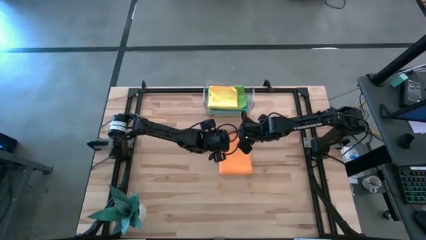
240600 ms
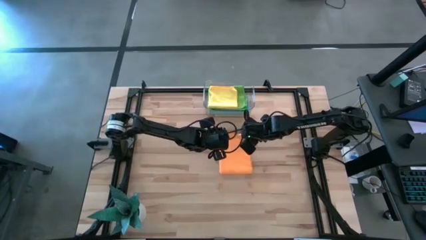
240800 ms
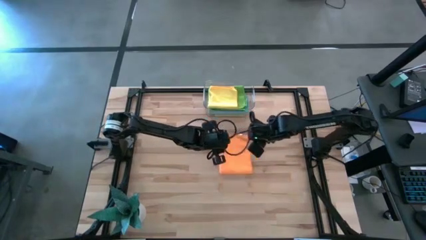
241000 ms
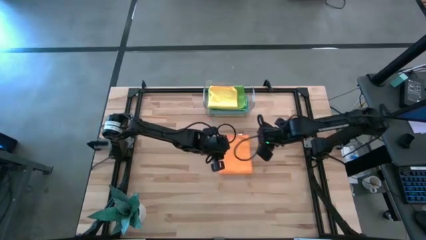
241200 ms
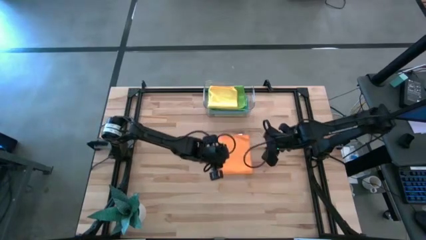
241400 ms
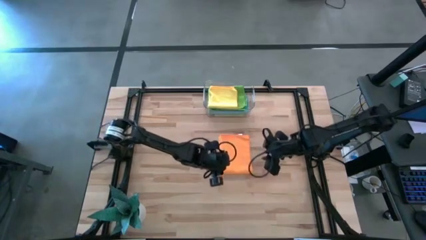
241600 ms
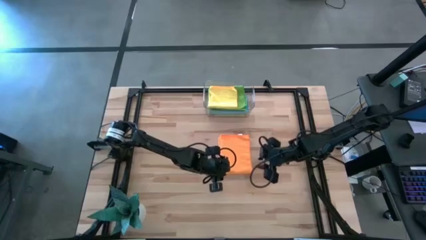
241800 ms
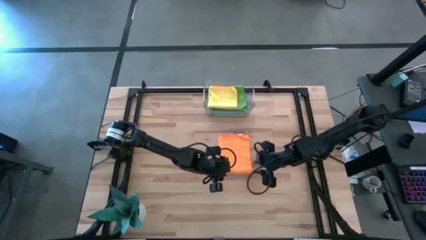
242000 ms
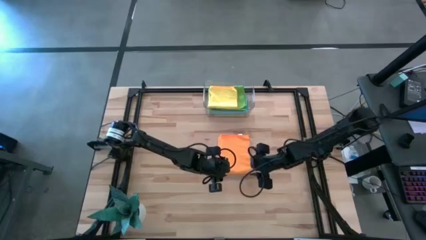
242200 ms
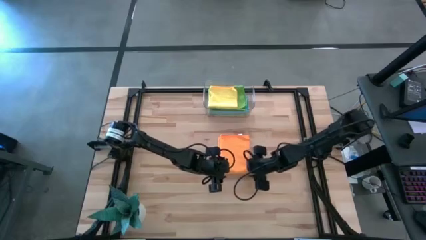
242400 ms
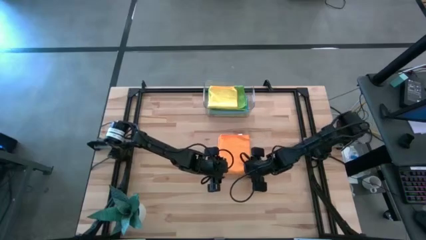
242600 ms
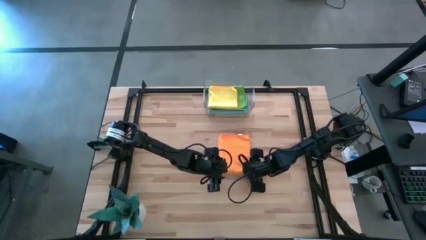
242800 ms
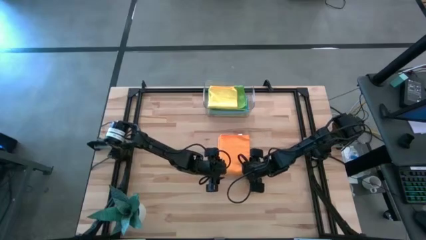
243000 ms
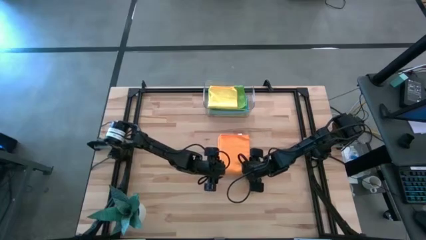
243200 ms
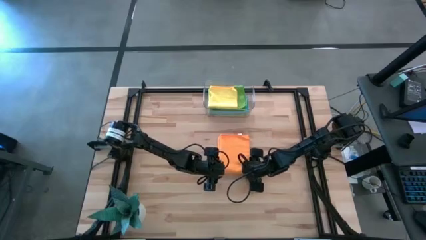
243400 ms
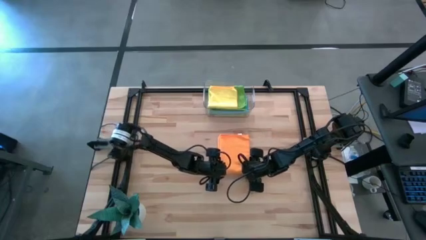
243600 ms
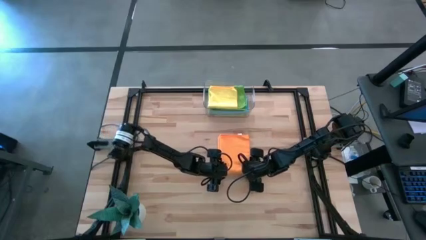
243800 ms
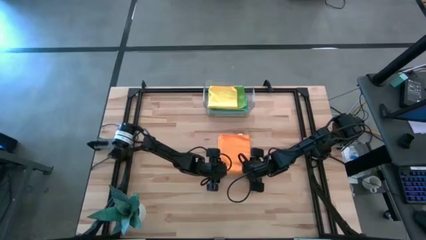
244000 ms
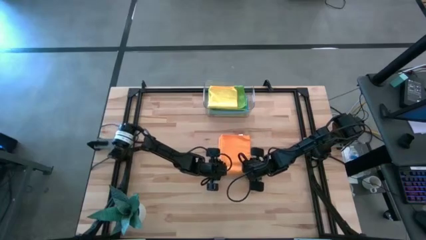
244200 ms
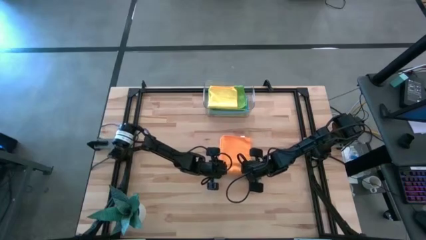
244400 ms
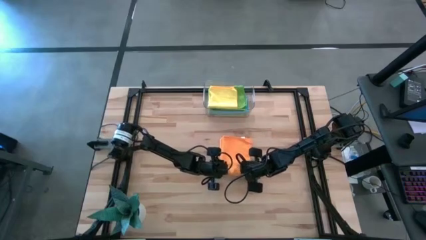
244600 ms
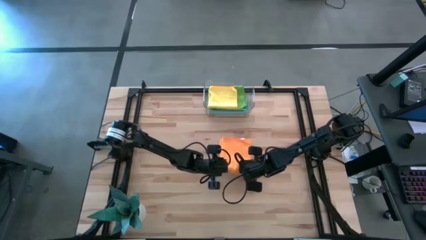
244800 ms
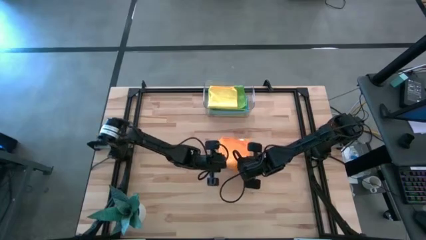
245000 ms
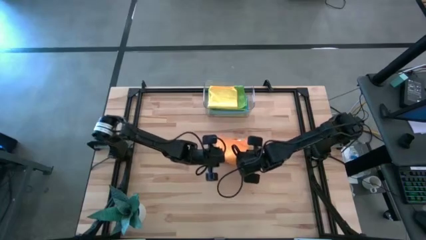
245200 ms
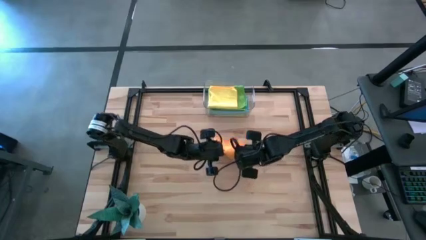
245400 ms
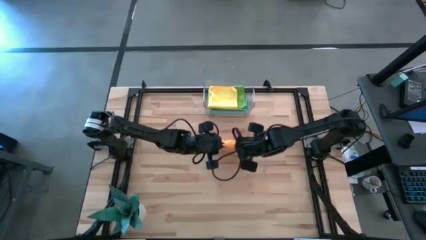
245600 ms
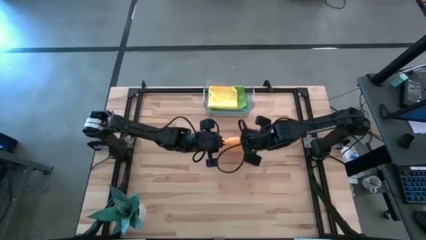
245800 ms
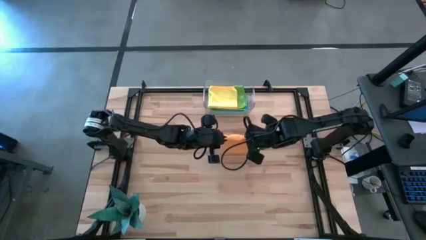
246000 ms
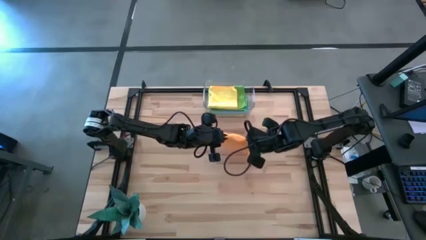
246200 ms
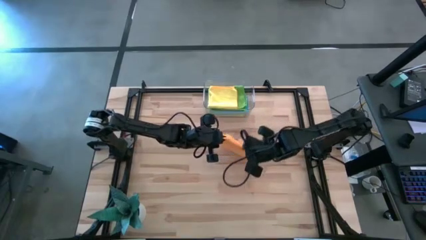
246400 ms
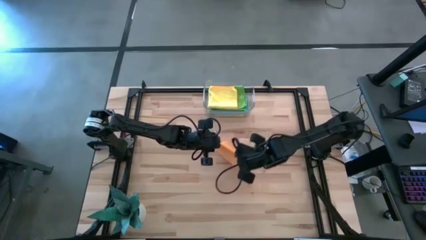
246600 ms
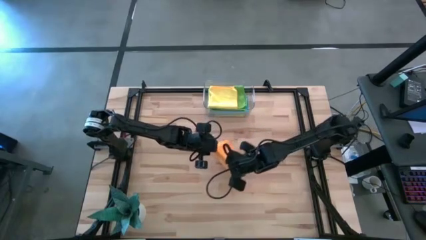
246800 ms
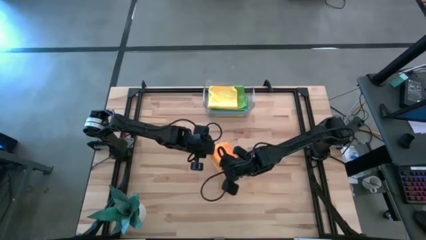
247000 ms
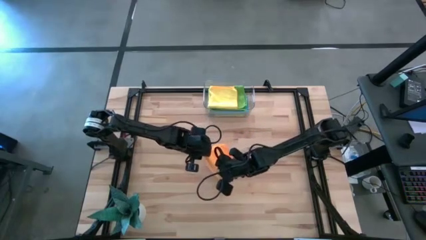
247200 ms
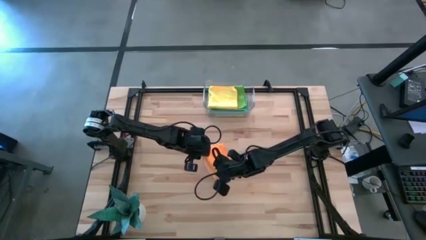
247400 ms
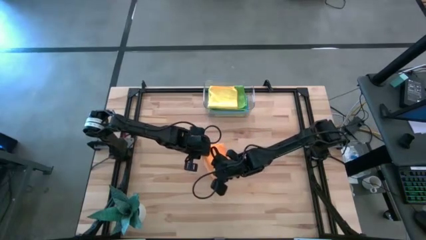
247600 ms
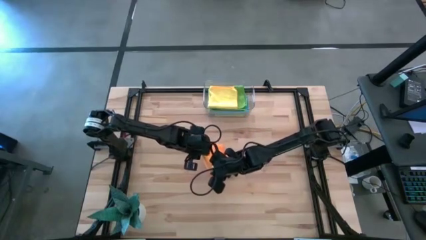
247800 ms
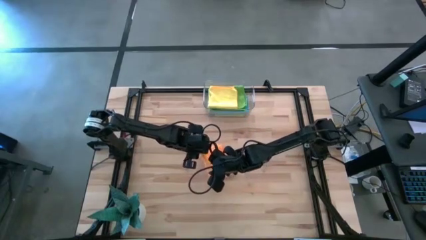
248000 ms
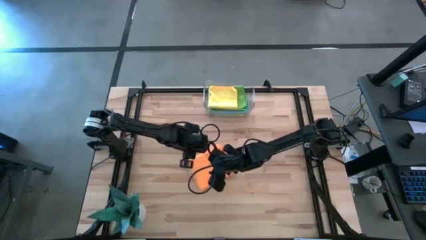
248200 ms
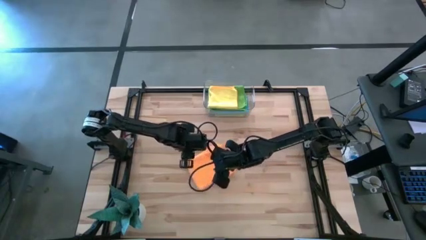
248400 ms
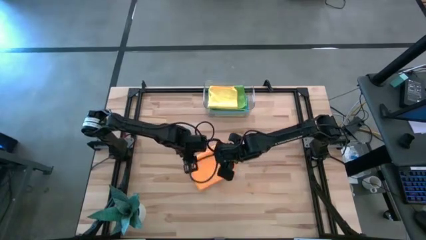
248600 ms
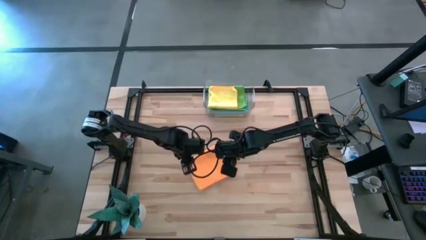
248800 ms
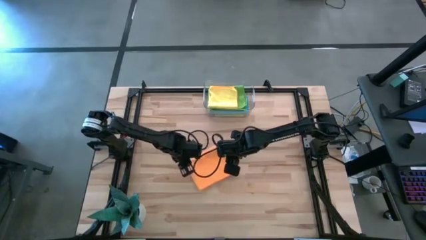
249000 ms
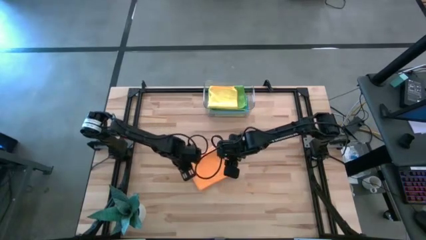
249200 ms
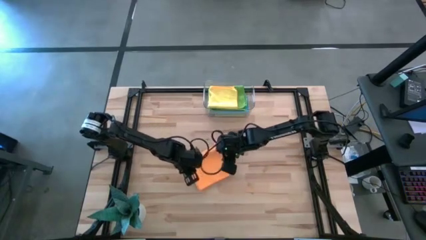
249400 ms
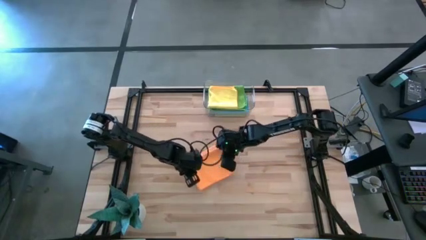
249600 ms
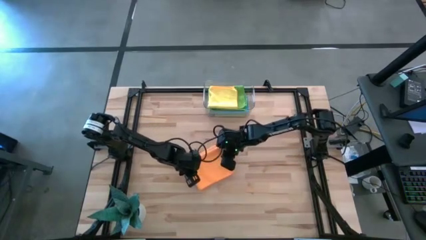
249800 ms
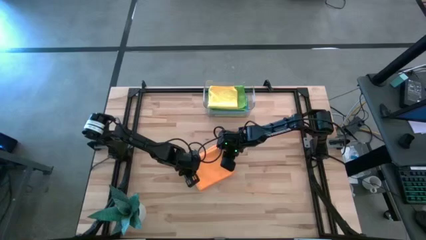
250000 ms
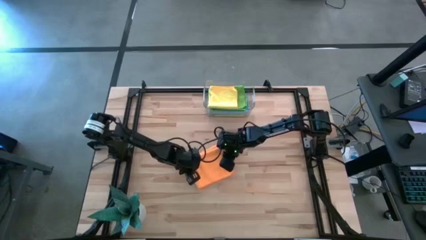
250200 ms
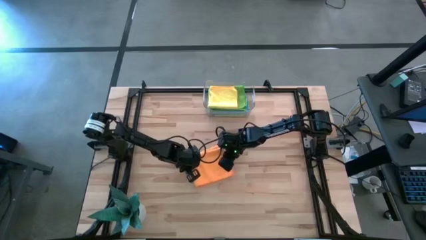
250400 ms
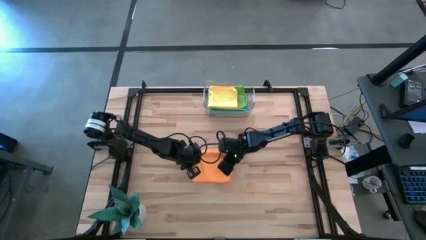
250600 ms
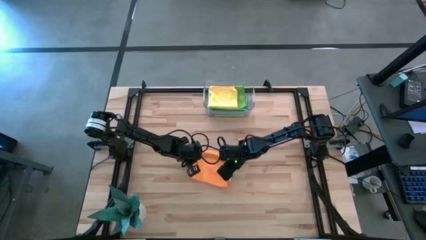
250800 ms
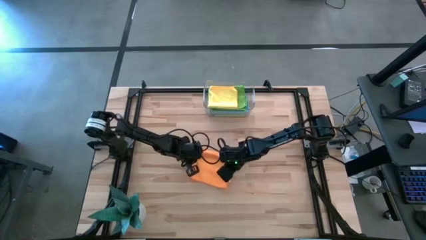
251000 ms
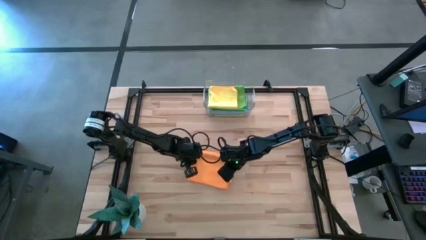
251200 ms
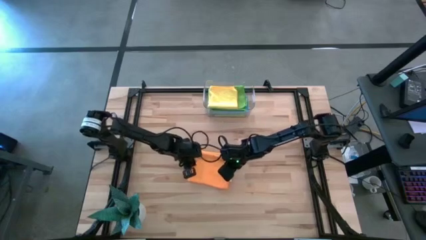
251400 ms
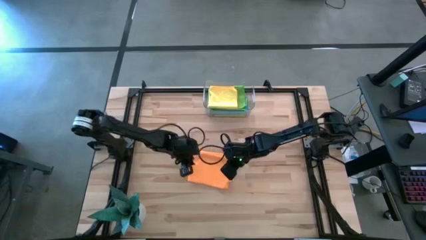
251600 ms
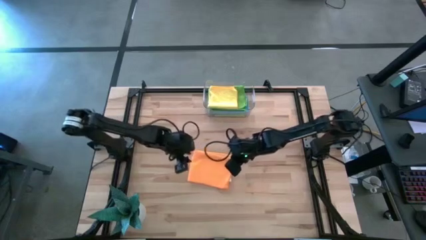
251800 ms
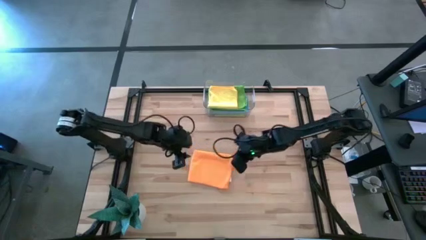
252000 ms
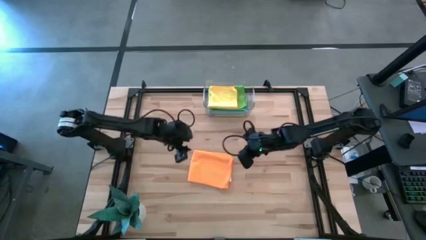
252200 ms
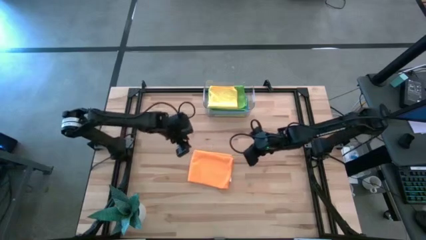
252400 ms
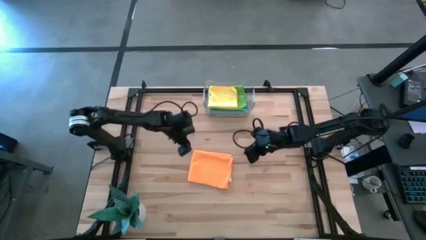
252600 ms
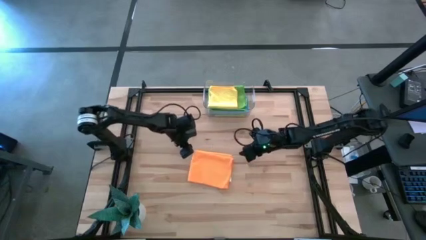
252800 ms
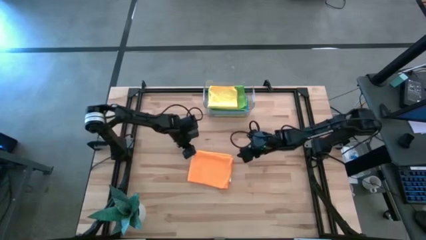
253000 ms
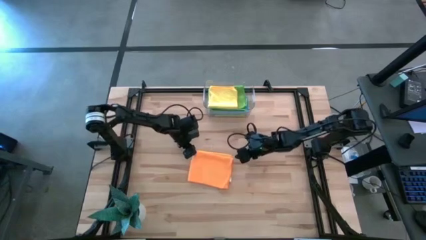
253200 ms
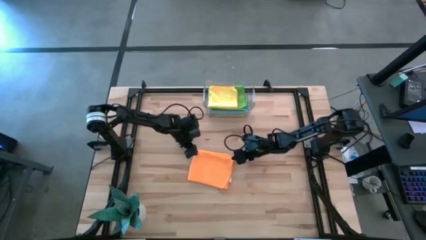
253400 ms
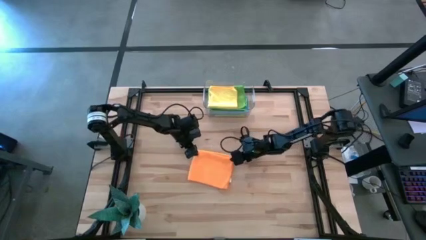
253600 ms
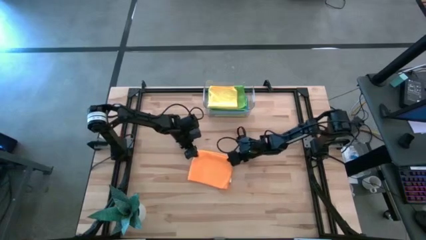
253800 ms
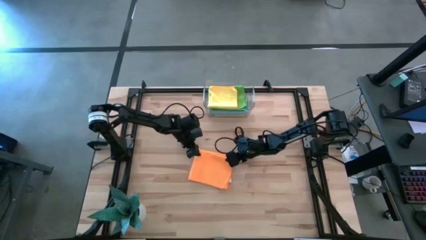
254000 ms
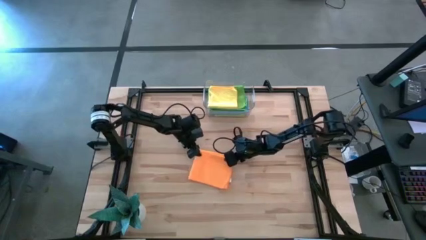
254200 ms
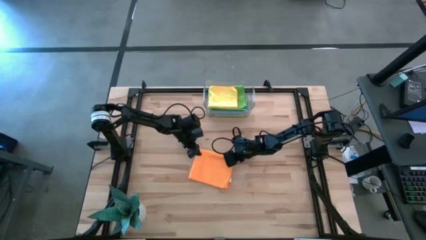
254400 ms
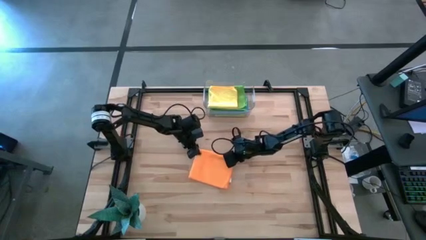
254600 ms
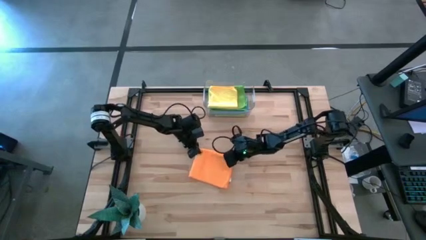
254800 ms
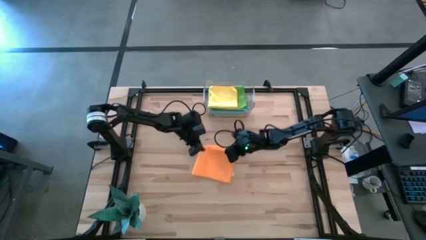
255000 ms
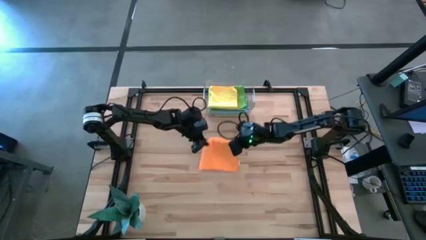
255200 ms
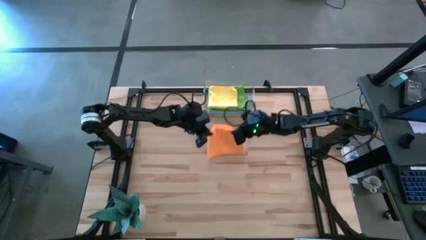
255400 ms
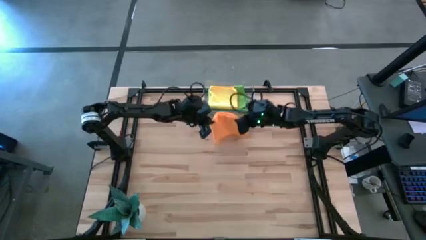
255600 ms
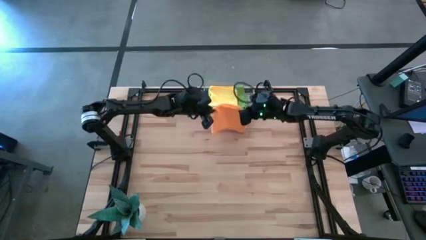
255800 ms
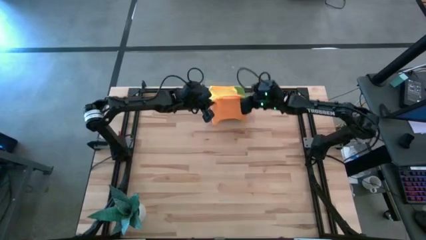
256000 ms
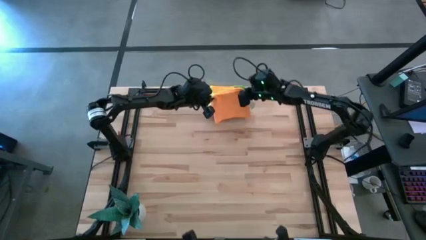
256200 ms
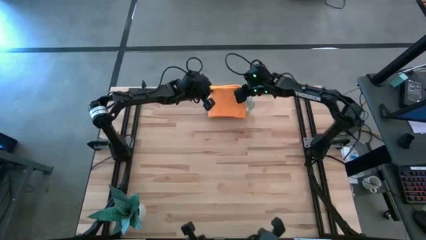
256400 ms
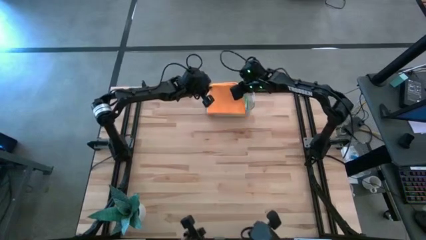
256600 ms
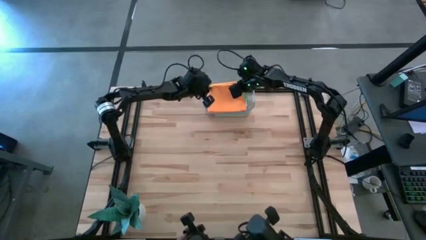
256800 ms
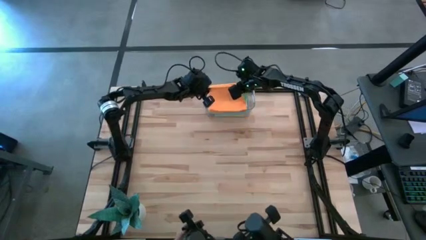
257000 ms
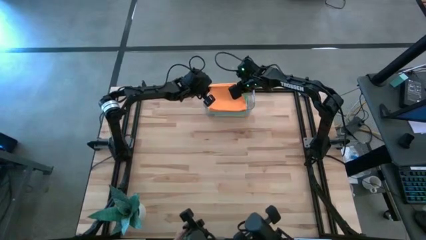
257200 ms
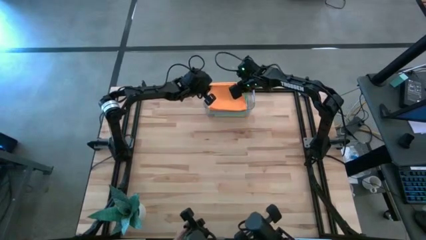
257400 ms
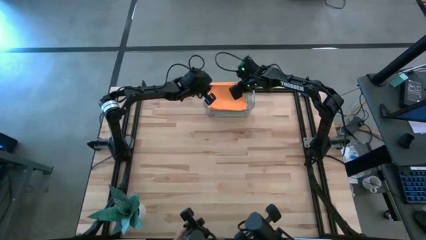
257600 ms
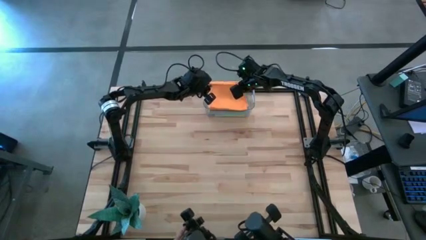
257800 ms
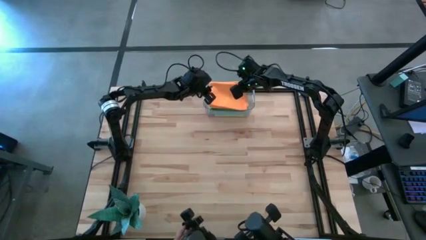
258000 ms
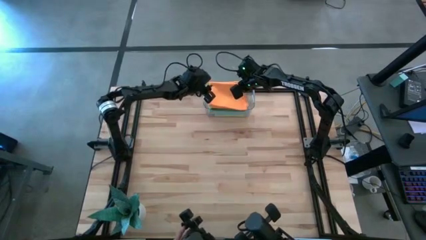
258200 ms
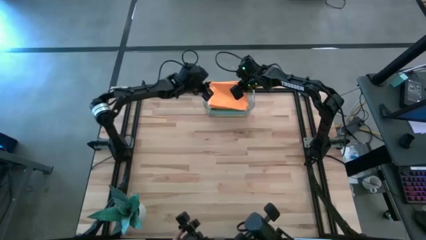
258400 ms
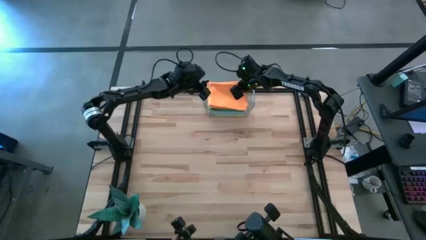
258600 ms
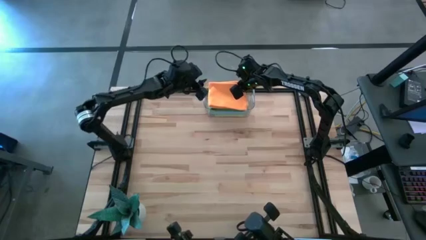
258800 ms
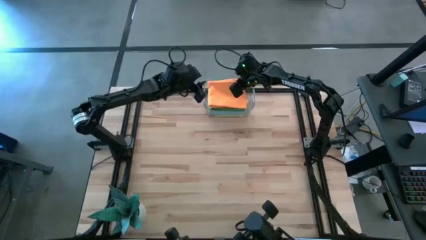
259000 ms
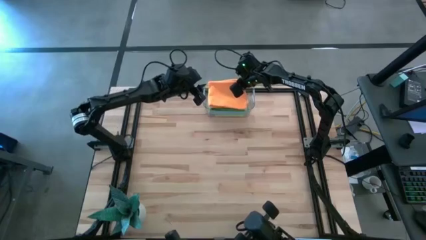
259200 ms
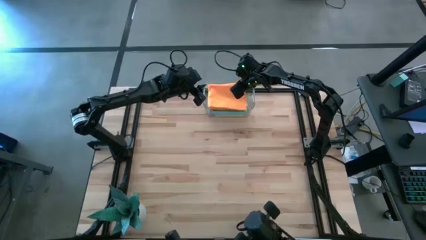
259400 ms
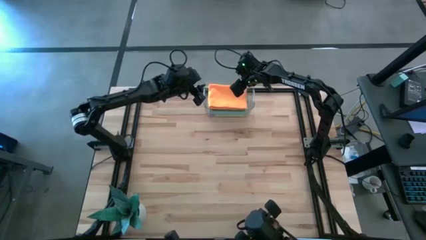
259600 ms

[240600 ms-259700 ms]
Task: Fold microfiber towels
Stack the orange microfiber cloth on top of the yellow microfiber cloth in the transparent bin
